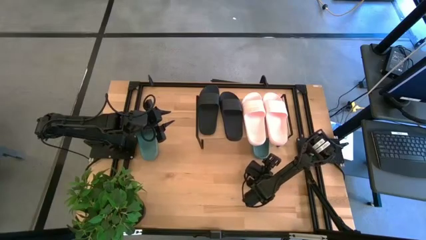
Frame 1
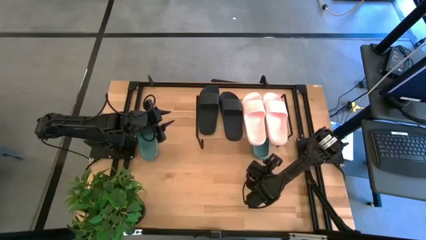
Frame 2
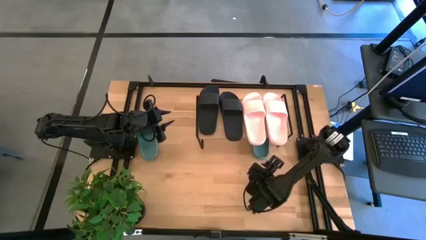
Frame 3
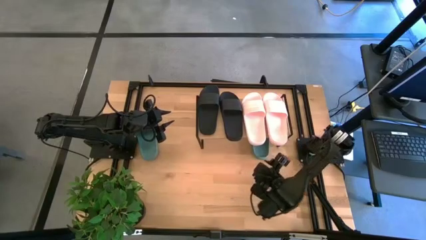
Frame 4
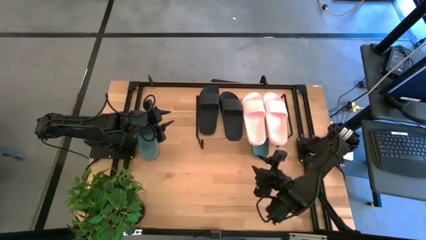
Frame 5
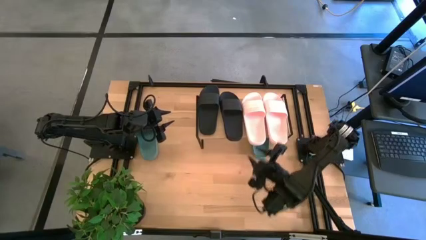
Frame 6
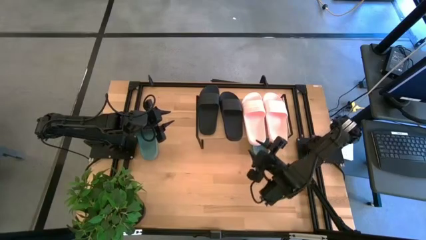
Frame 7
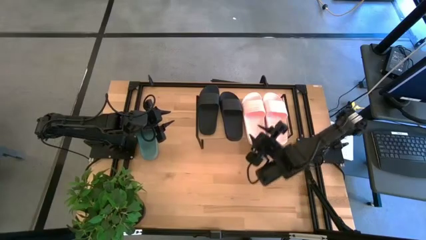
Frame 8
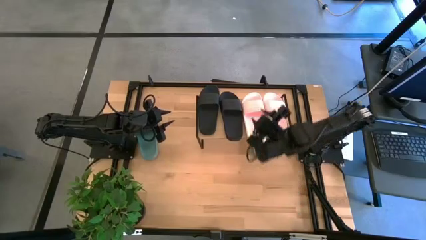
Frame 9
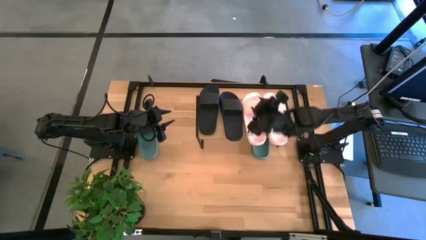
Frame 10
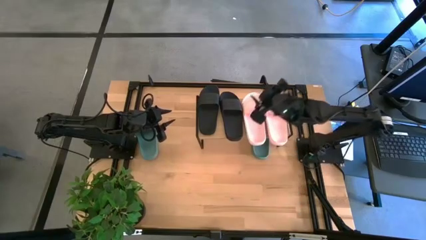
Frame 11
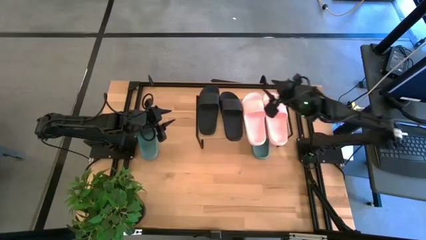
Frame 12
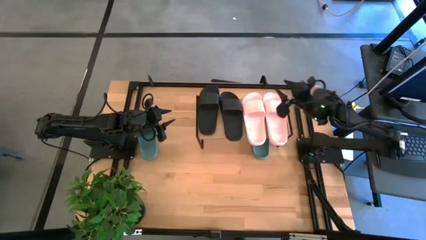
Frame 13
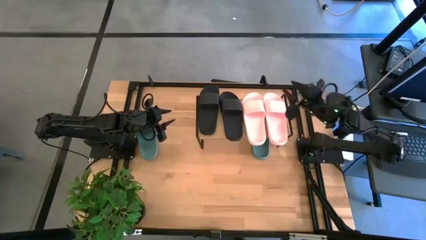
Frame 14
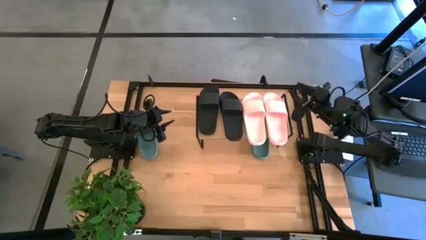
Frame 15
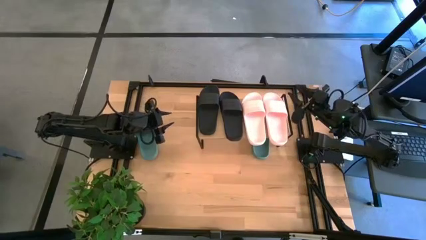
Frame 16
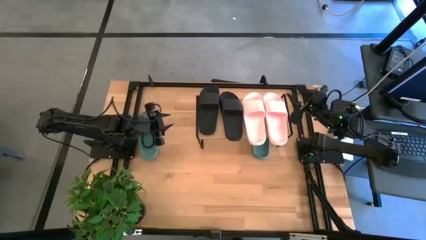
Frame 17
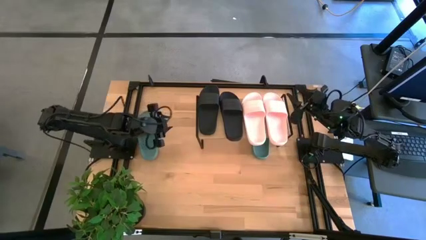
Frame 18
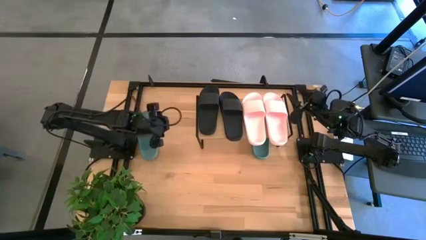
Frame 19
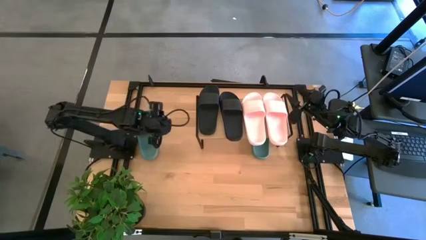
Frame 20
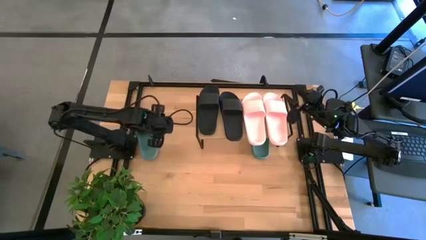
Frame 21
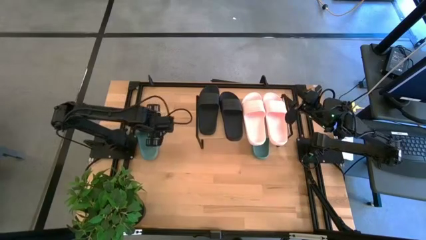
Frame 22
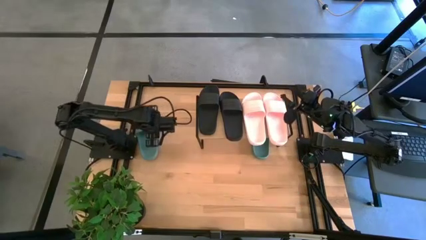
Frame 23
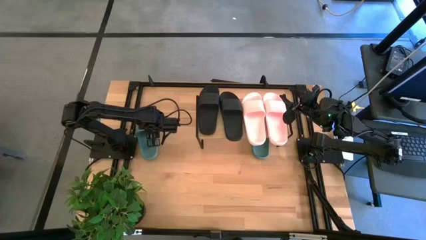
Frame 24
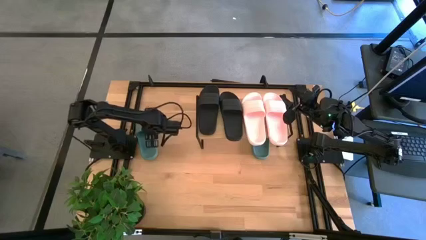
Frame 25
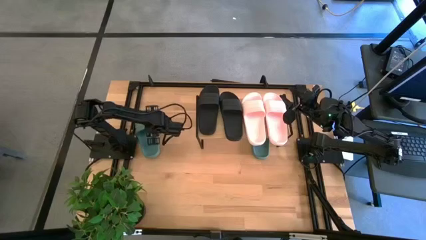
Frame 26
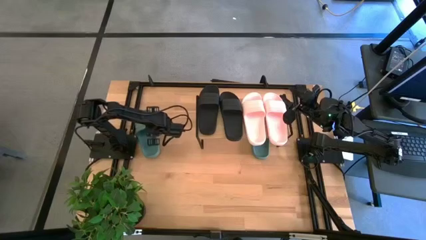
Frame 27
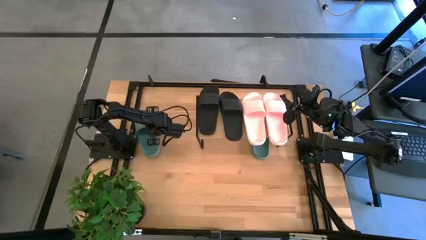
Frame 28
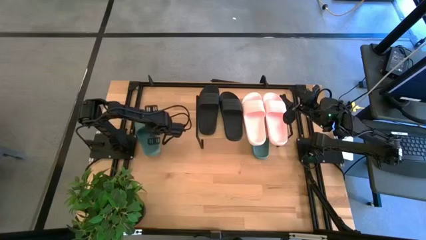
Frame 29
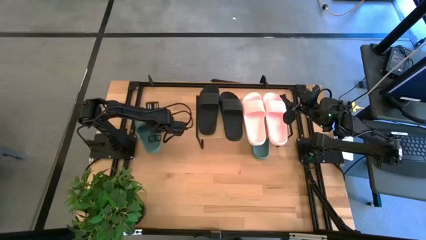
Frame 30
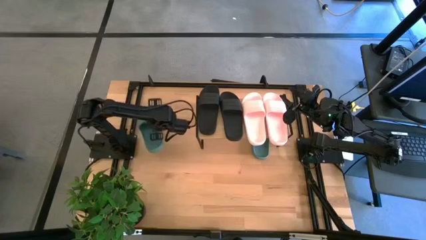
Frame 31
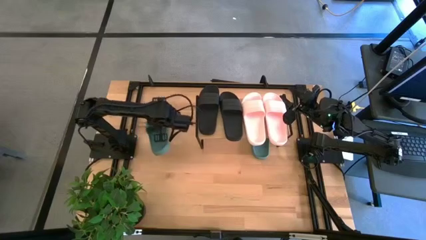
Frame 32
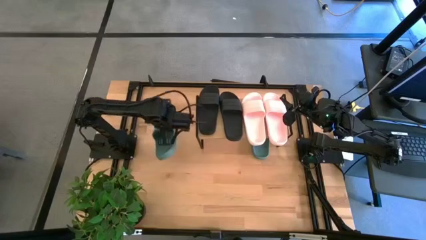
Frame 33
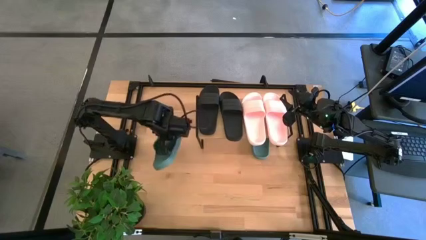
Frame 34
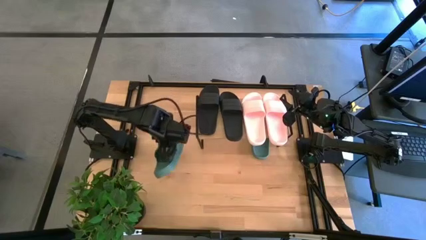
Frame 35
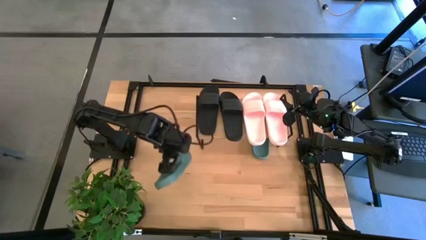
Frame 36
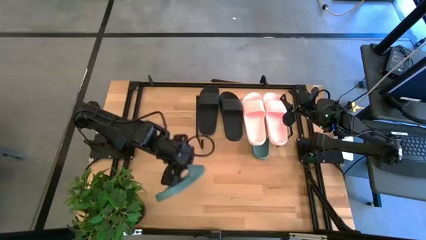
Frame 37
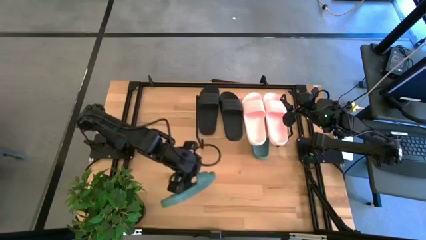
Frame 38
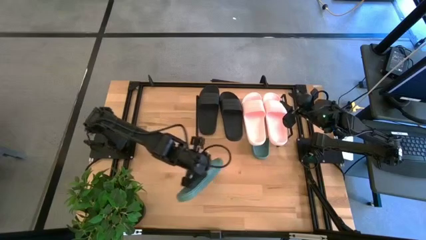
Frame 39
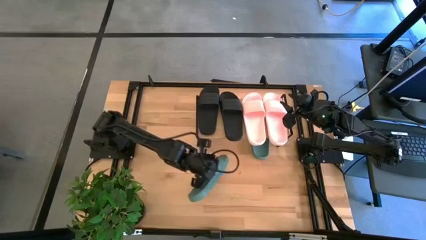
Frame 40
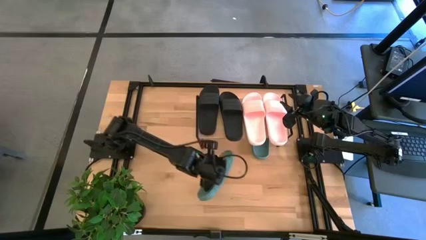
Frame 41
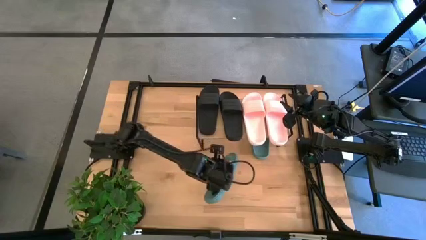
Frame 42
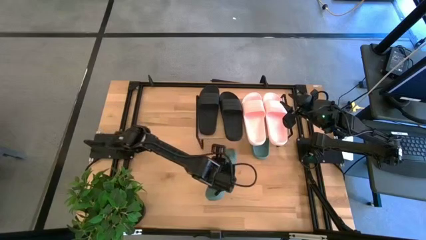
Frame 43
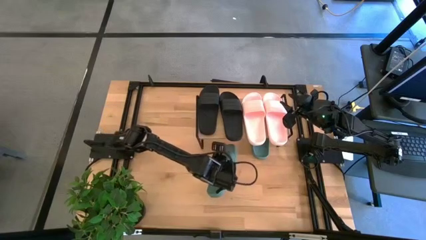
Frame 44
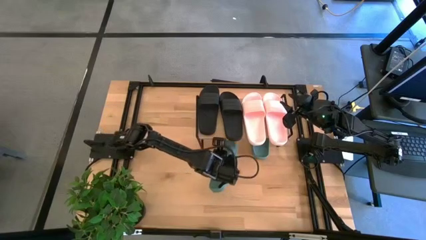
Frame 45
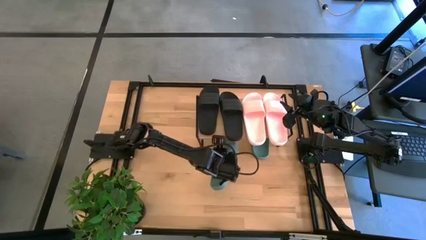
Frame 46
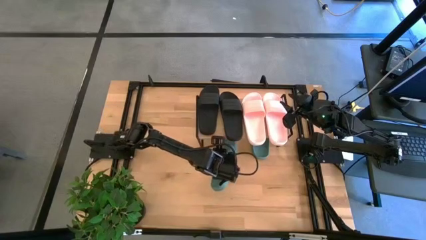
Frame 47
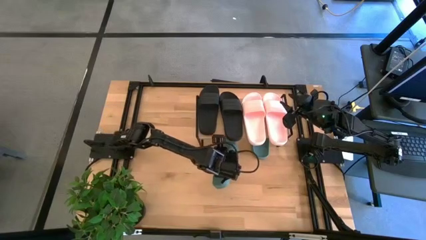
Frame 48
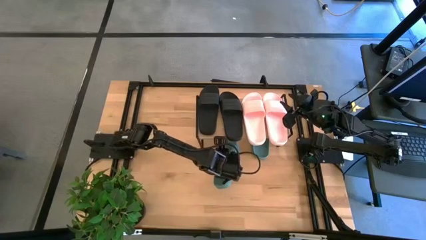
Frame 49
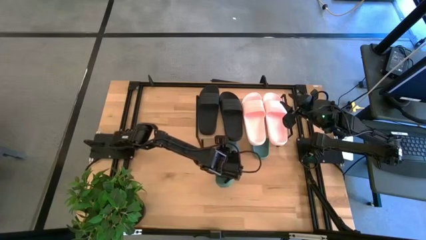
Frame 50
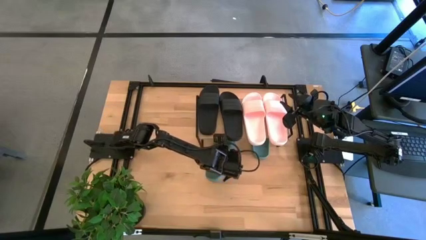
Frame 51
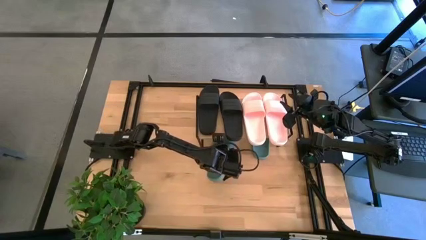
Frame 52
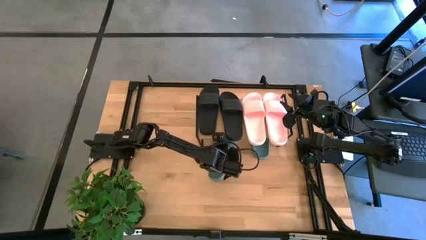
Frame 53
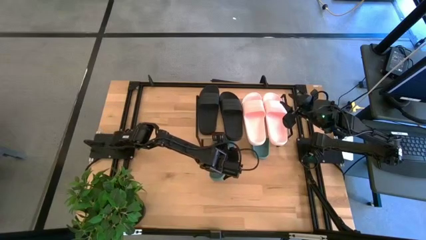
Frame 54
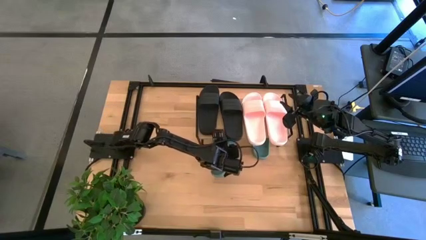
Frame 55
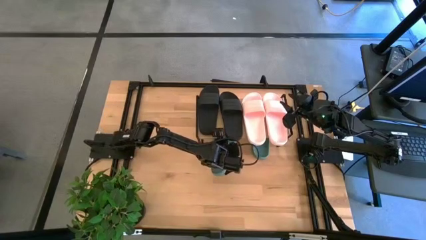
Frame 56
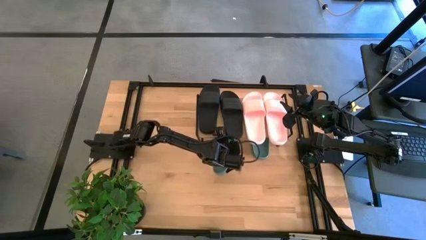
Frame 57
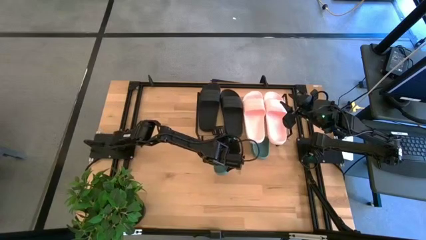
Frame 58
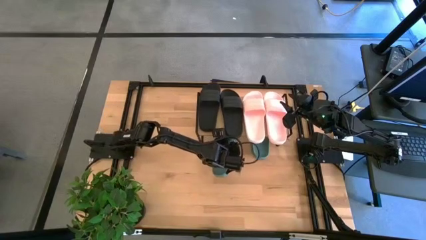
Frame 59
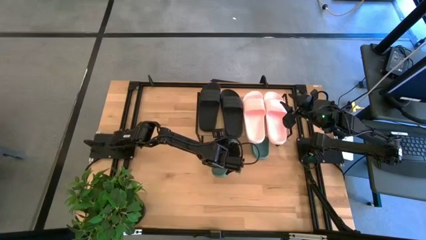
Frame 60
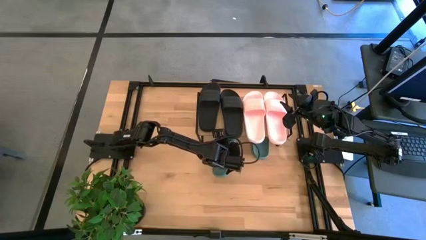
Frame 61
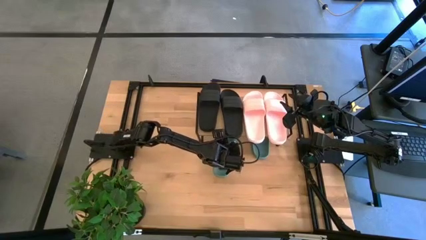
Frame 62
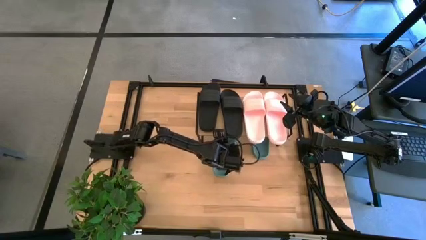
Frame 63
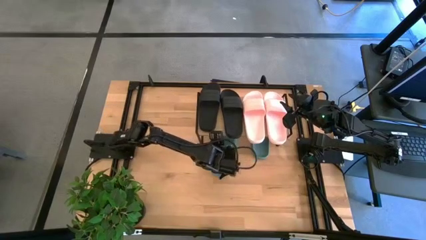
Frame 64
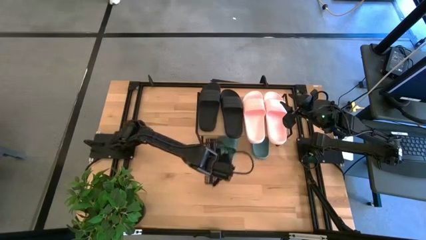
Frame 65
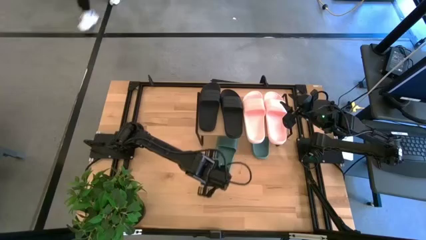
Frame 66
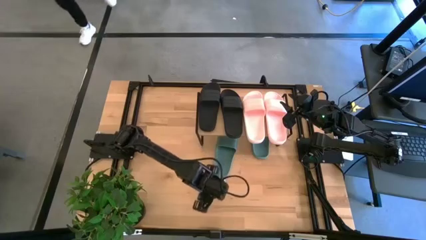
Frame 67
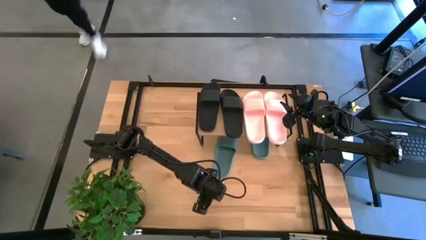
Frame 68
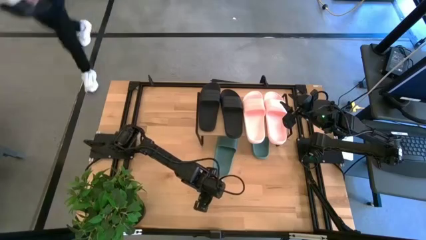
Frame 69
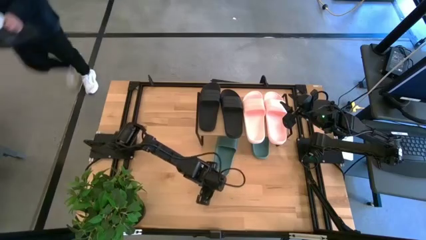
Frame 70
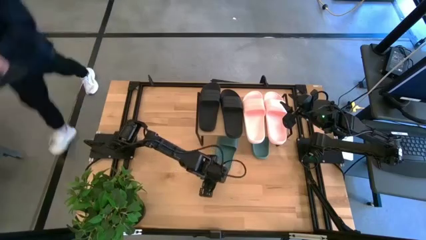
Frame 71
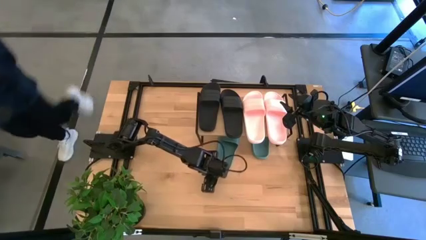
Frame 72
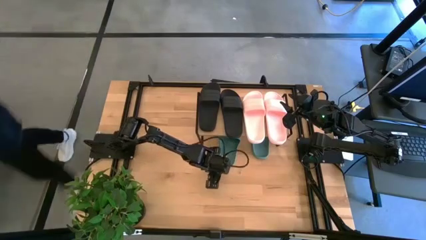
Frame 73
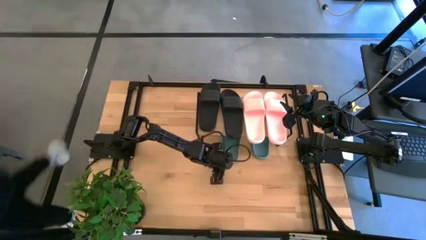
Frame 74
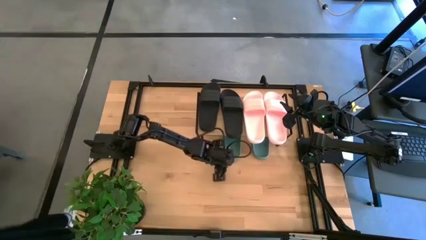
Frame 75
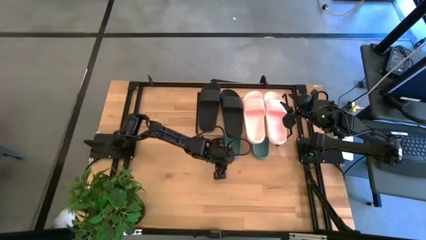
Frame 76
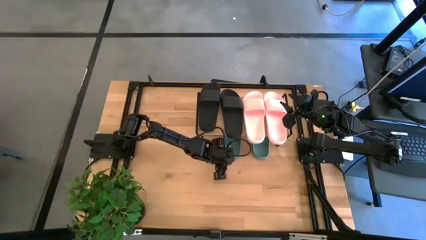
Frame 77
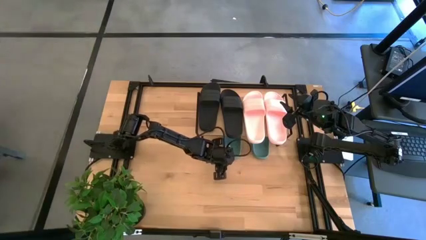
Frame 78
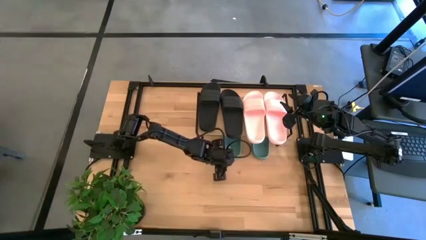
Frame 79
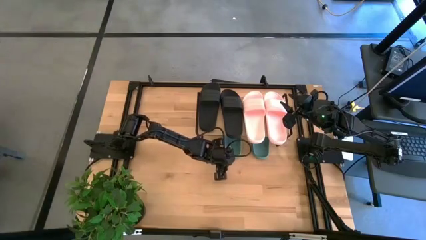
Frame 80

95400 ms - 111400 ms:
Task: Pick and place slides into the shelf
Put the green slide under the shelf
